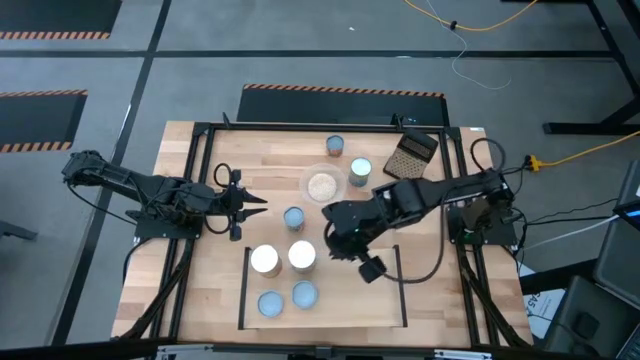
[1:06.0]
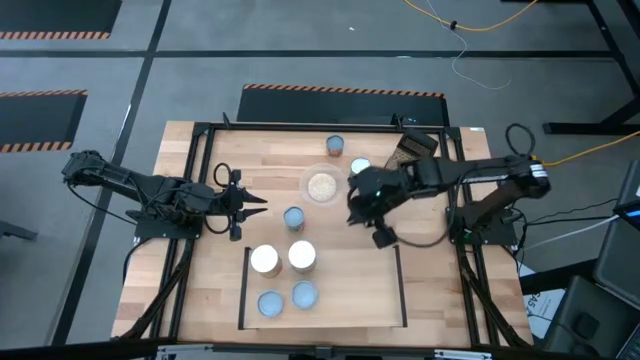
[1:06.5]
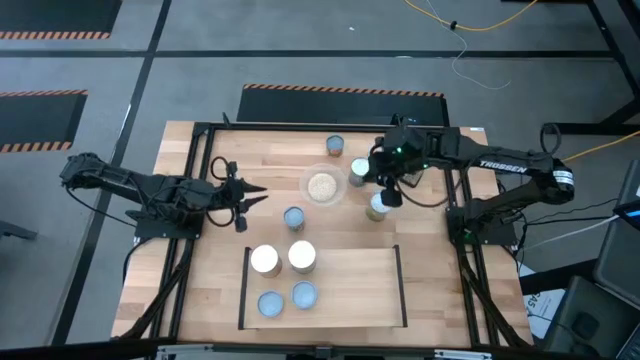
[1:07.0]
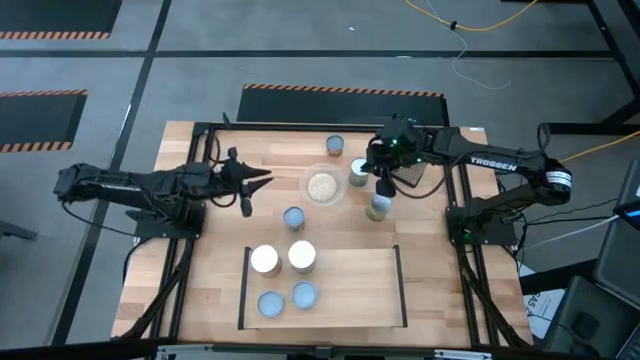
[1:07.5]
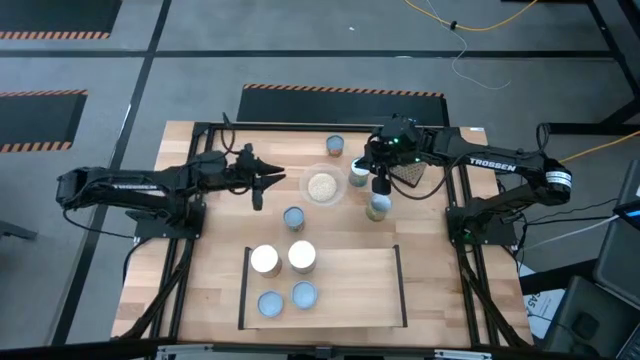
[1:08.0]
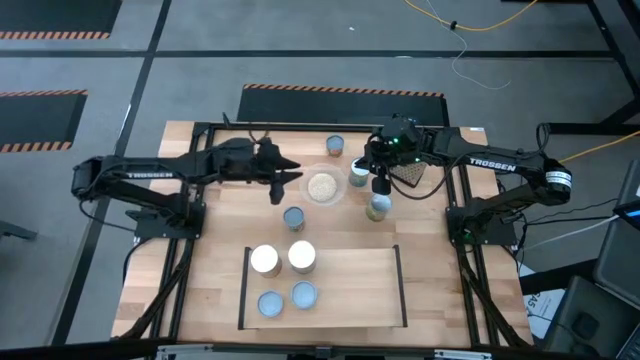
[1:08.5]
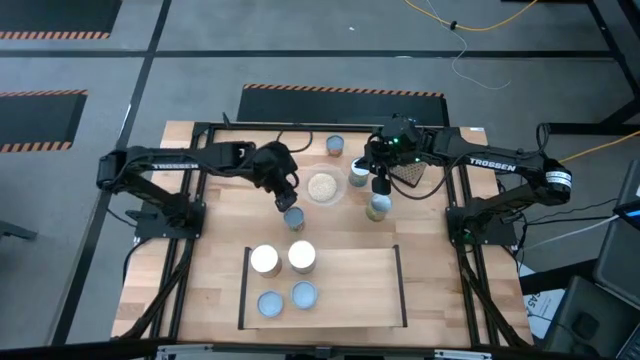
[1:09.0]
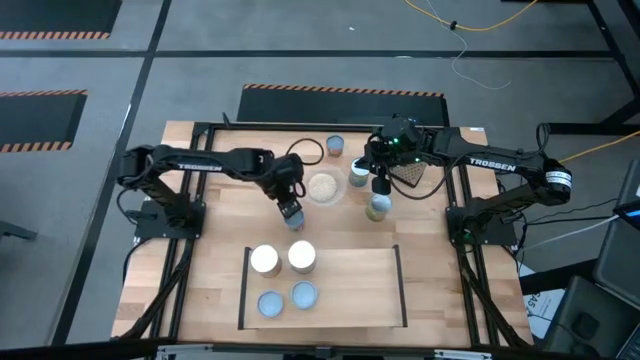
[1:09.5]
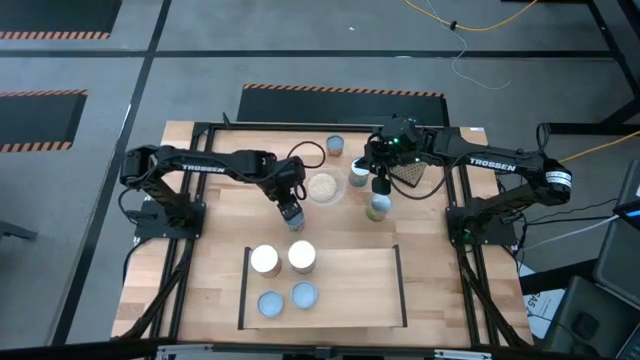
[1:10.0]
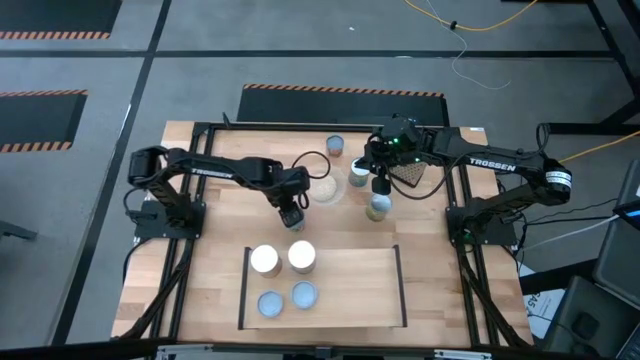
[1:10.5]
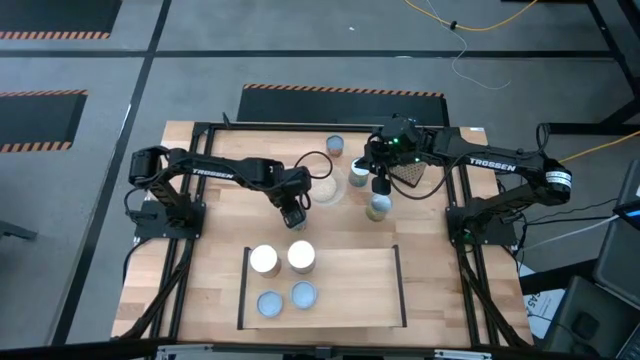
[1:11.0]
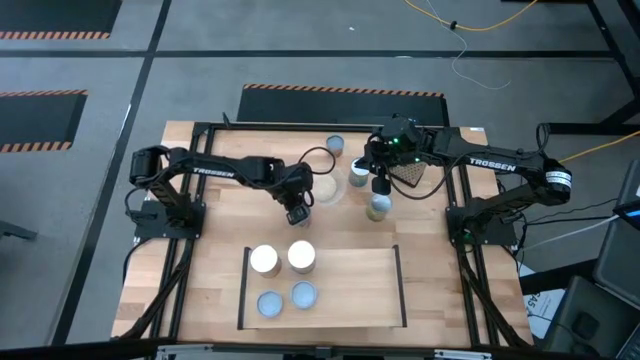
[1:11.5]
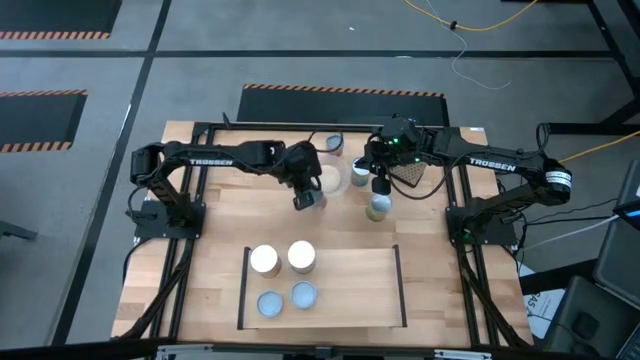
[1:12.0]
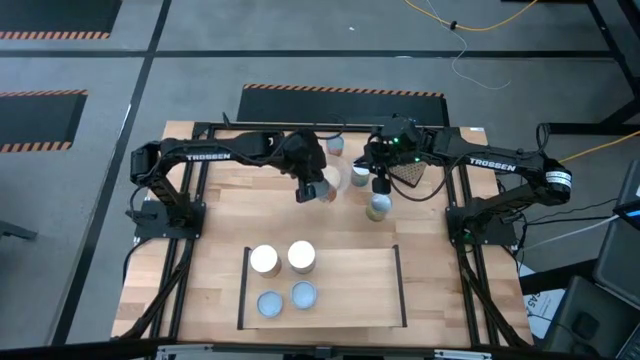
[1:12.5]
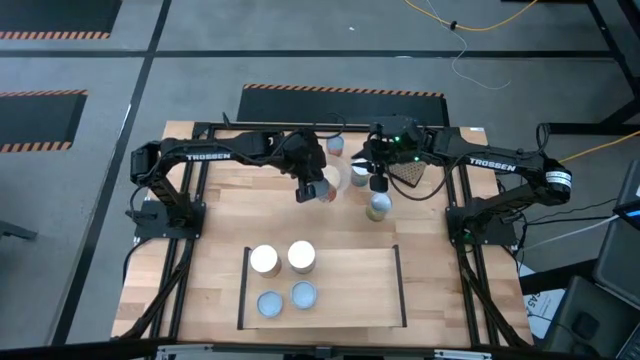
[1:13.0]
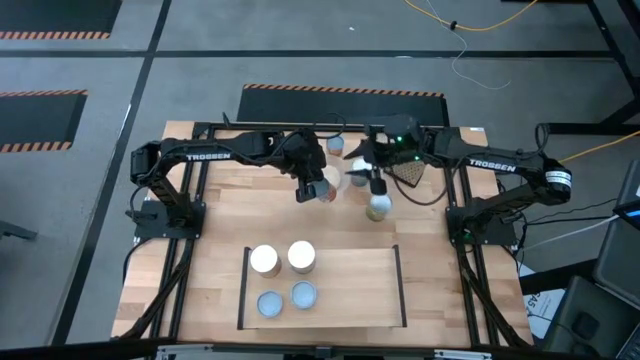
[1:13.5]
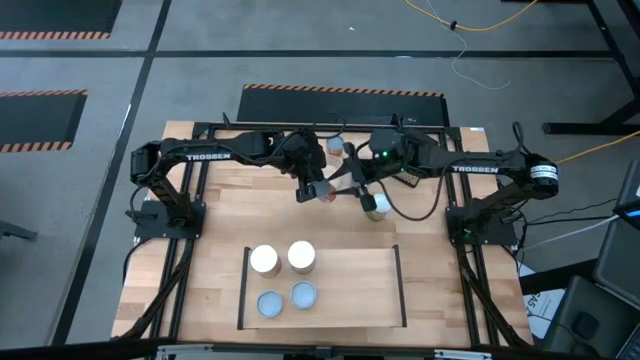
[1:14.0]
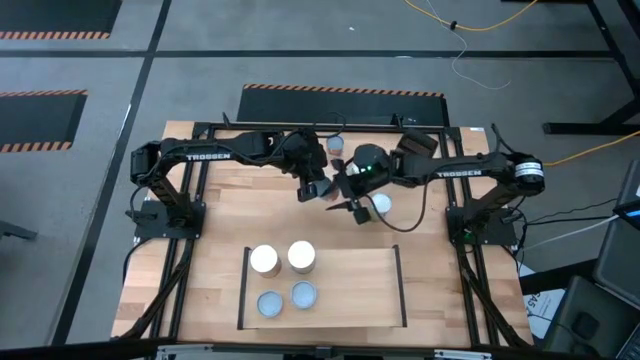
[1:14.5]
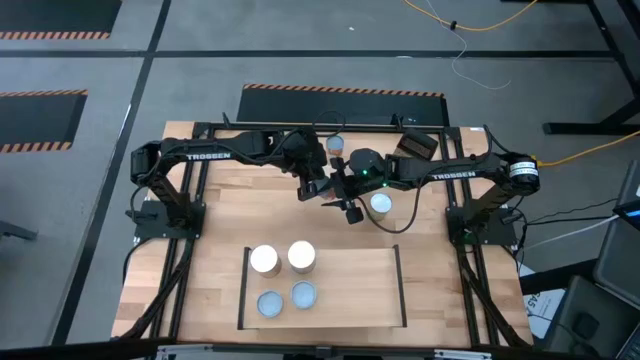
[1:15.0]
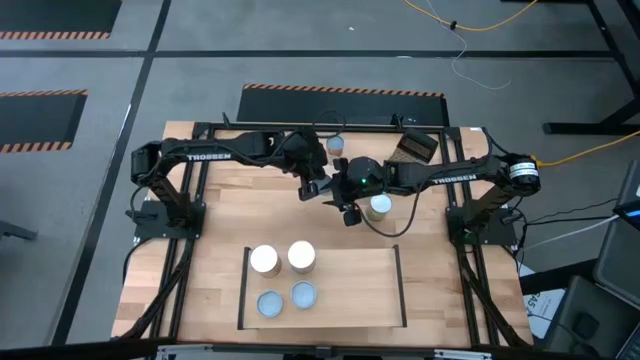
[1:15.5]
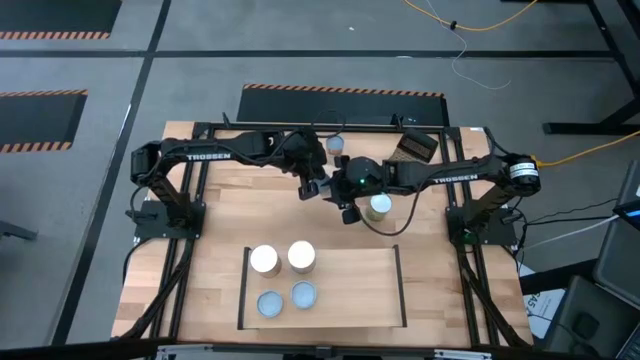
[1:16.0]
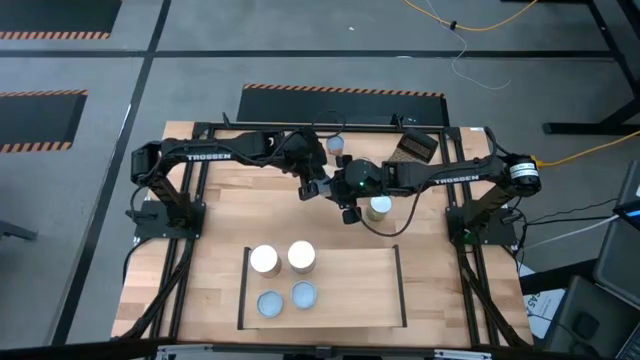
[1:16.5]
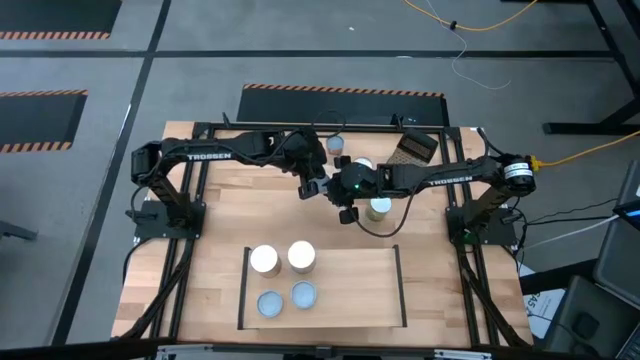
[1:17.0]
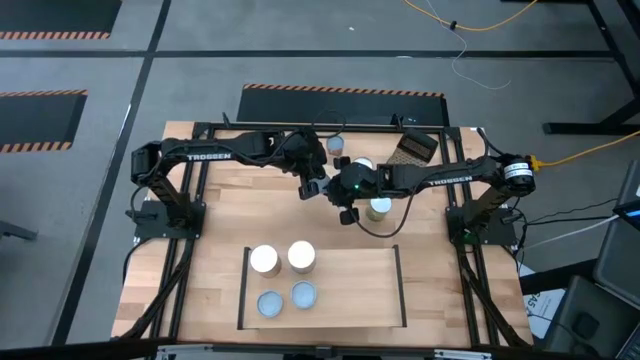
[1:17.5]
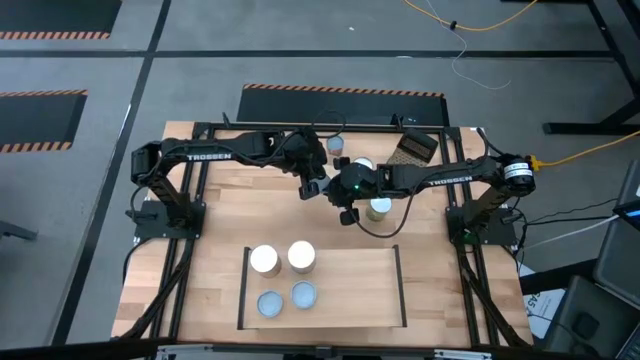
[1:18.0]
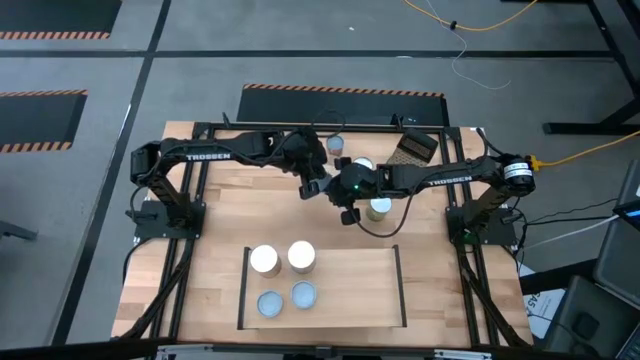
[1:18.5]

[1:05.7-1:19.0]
Task: Pick and place cans onto a shelf
Put the canned mixed fruit on the shelf

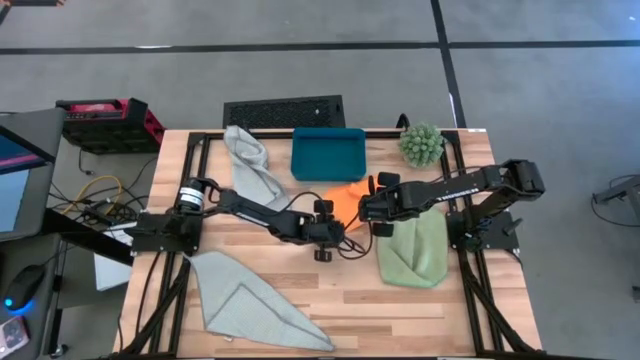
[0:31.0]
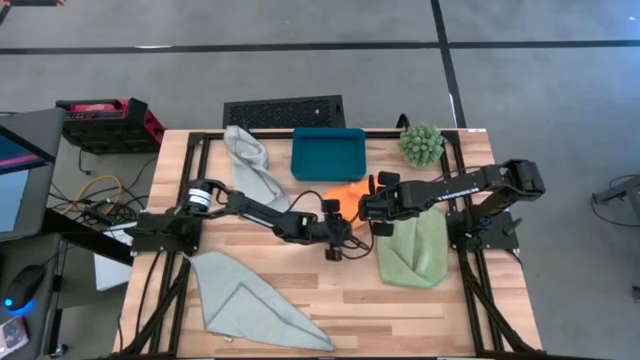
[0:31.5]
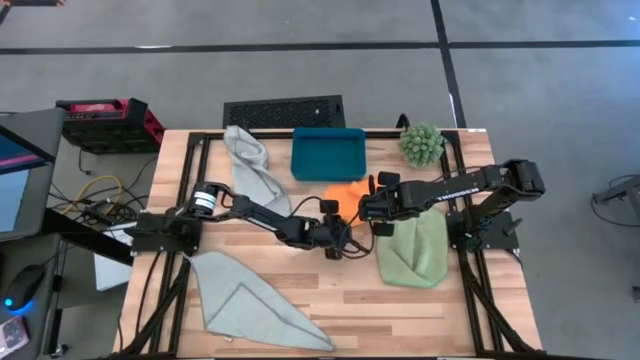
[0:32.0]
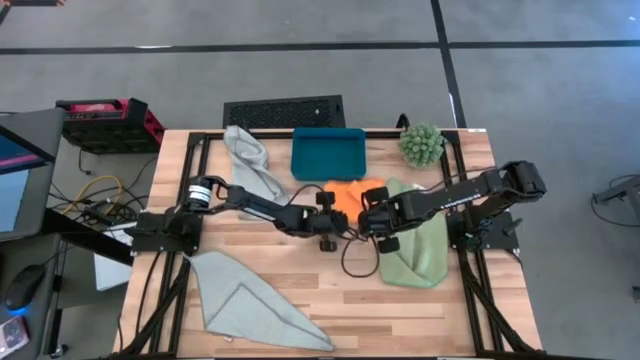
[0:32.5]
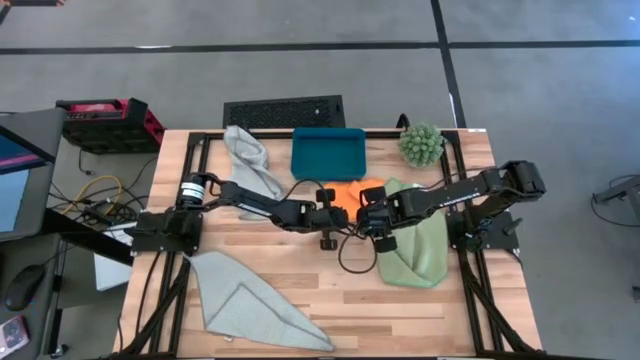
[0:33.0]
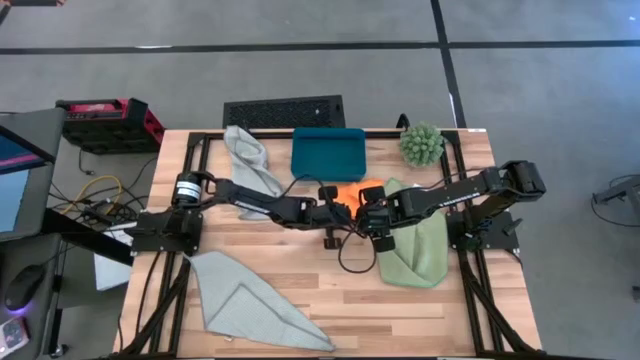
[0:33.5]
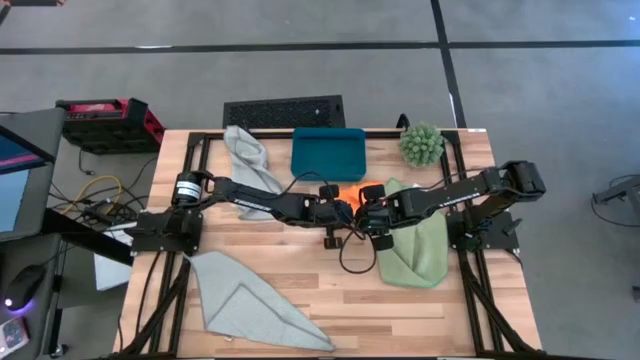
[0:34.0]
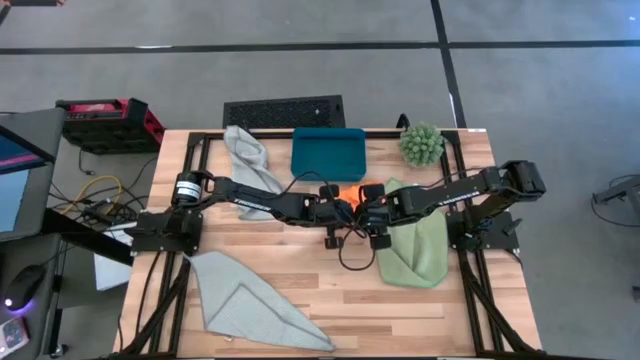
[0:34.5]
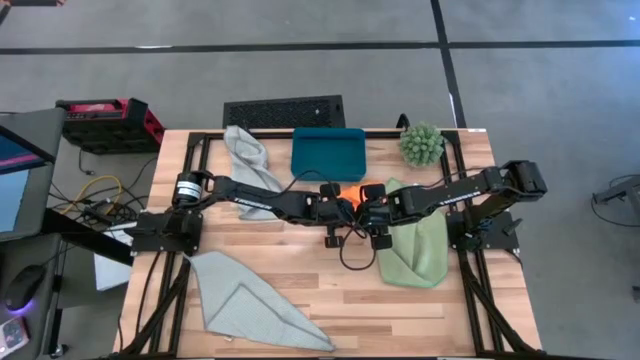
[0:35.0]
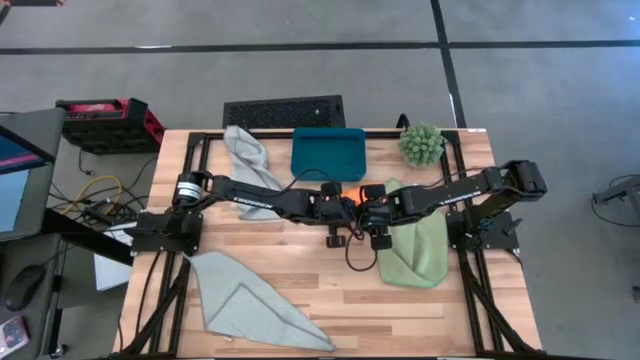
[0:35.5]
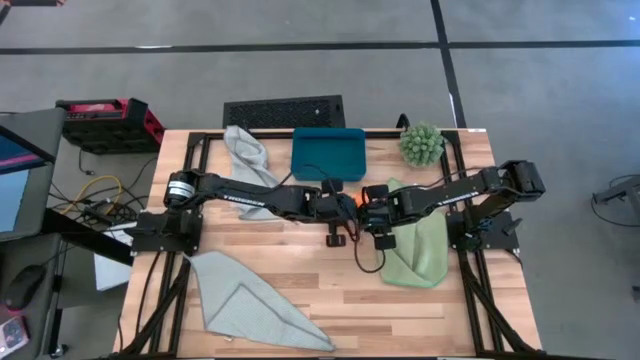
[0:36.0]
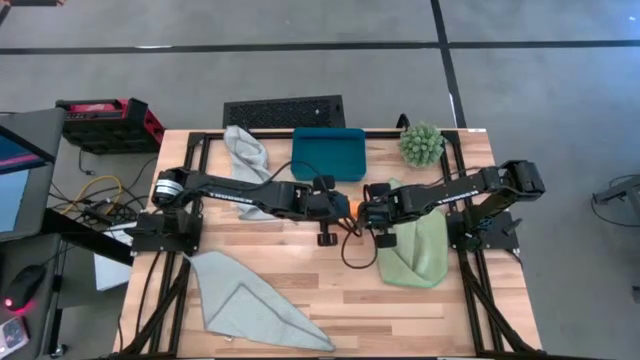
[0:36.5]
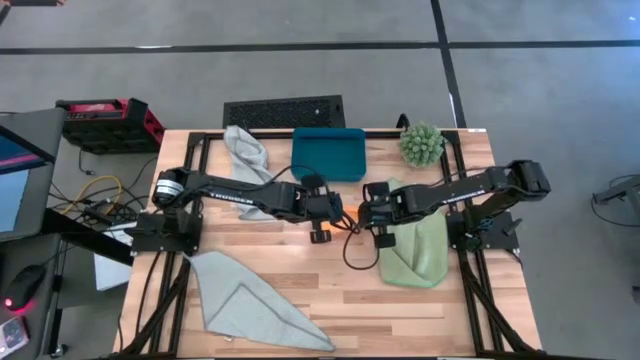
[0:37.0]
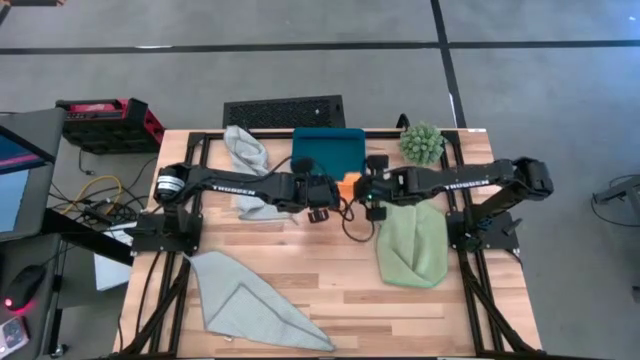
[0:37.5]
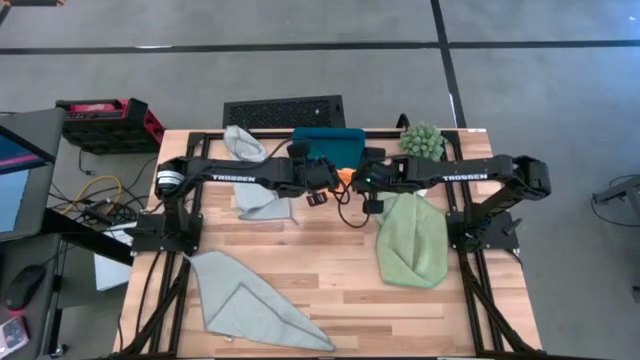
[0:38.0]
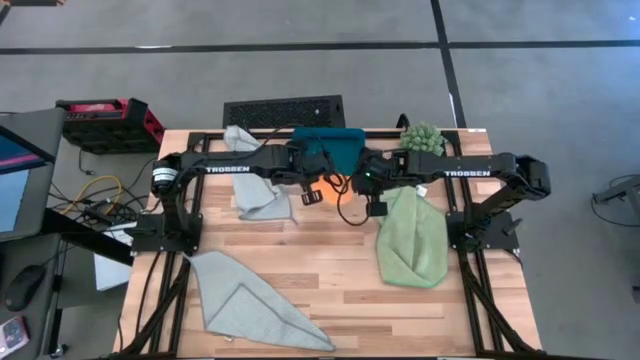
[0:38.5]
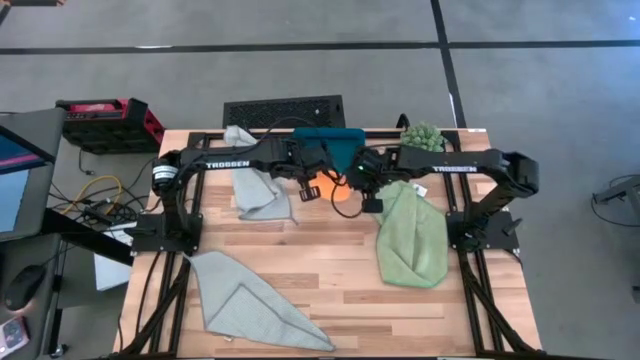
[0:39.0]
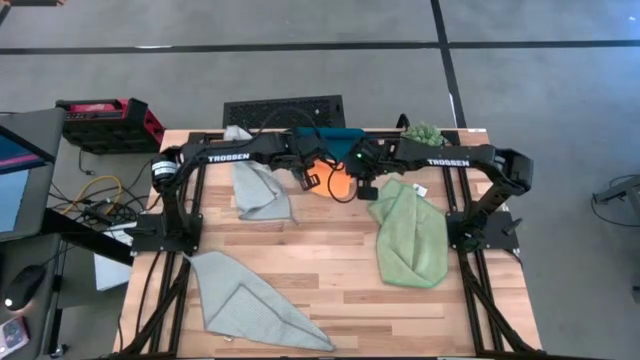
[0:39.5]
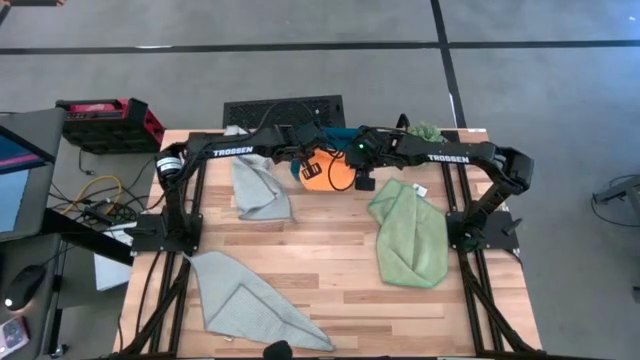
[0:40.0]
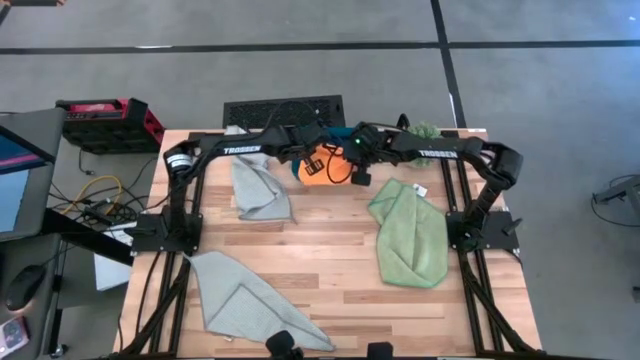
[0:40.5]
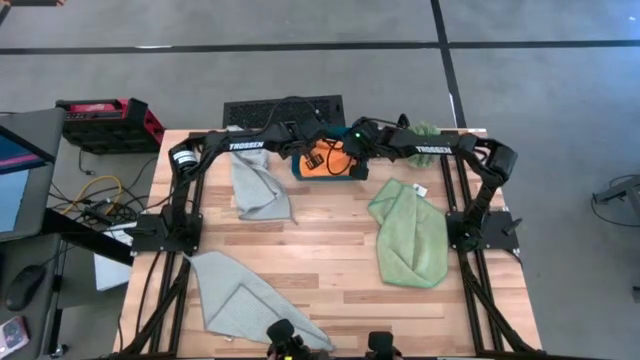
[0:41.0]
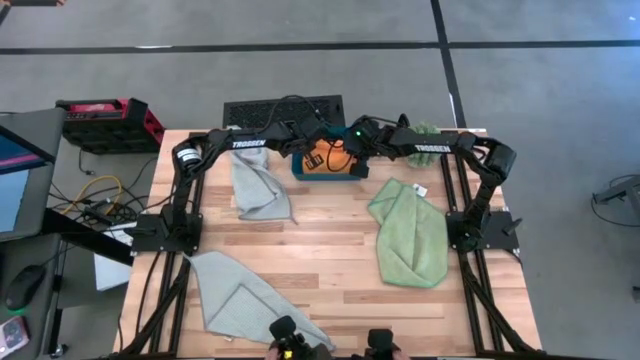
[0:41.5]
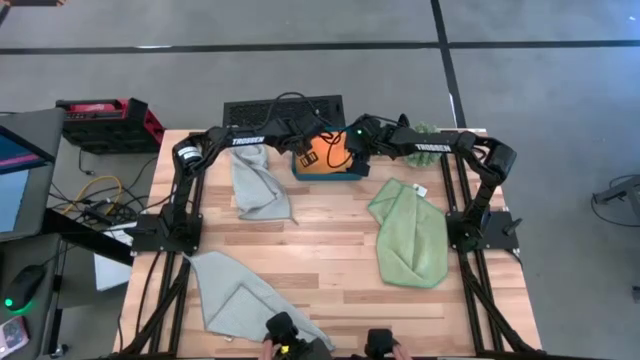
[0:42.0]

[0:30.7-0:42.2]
Task: Fold microfiber towels
Put the orange microfiber cloth in the blue bin
